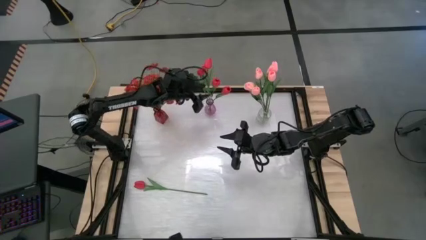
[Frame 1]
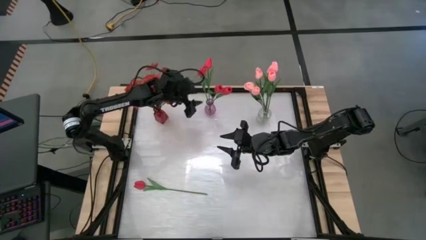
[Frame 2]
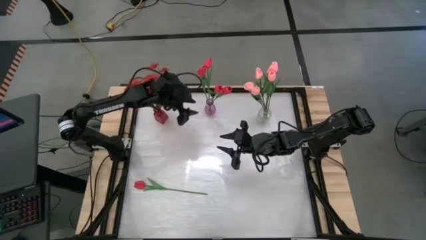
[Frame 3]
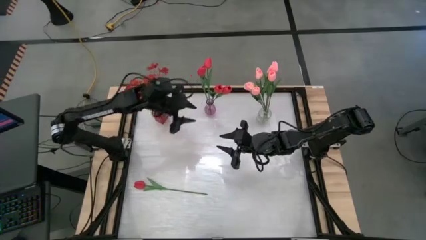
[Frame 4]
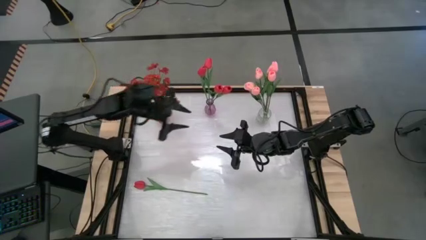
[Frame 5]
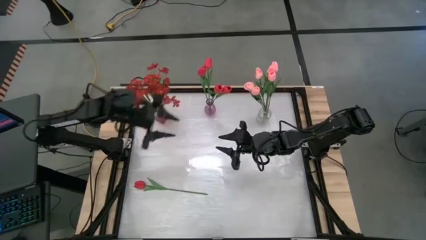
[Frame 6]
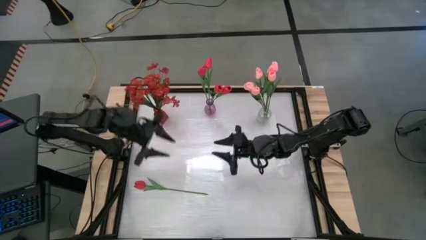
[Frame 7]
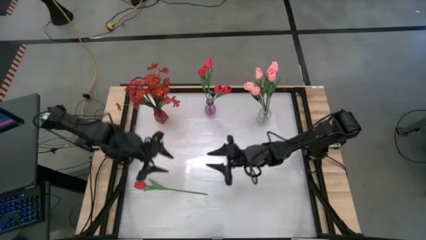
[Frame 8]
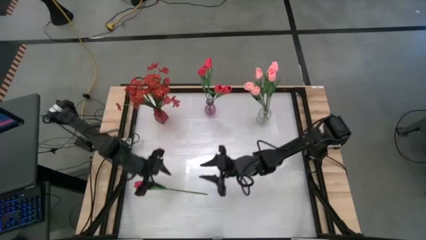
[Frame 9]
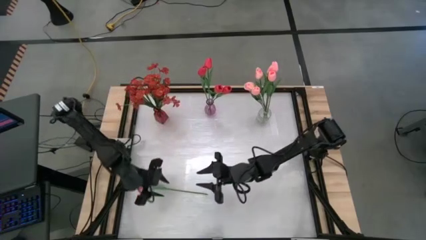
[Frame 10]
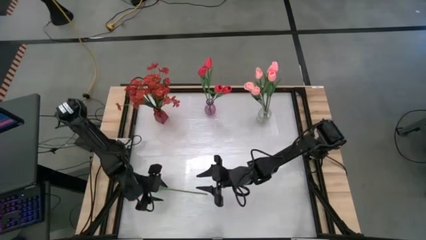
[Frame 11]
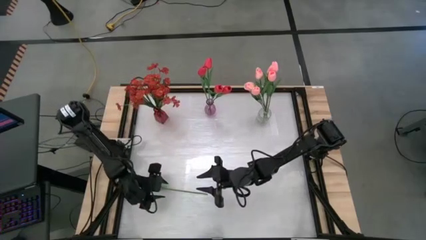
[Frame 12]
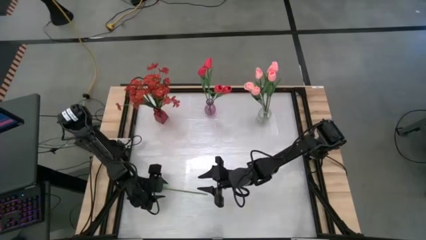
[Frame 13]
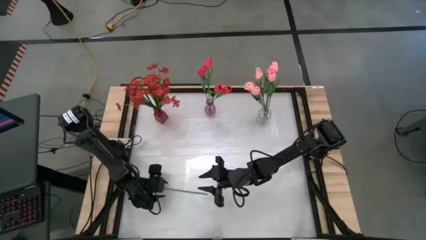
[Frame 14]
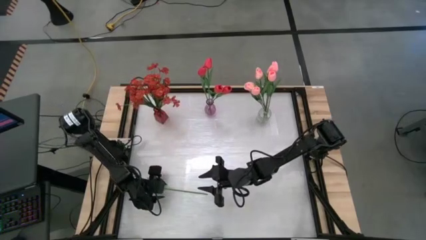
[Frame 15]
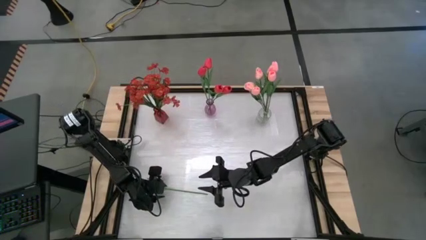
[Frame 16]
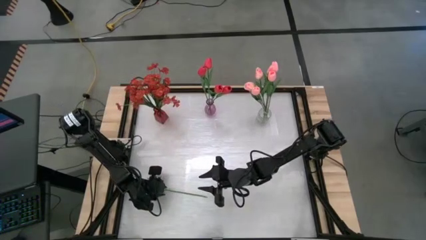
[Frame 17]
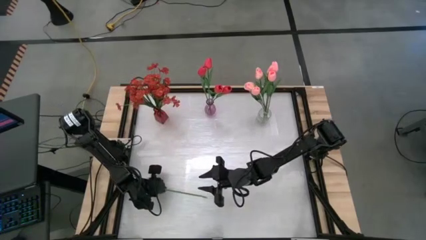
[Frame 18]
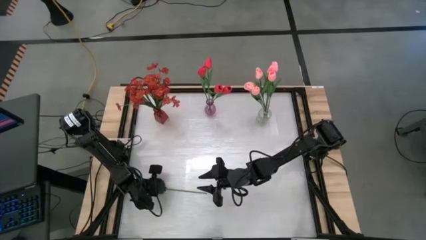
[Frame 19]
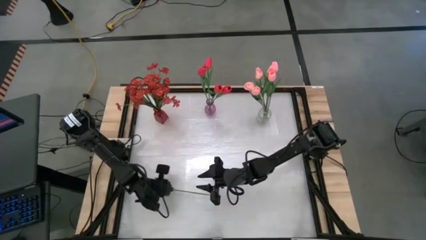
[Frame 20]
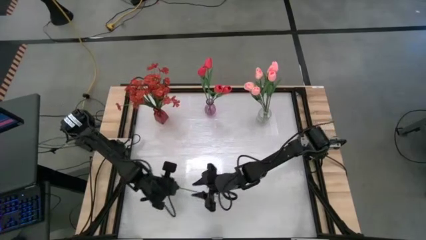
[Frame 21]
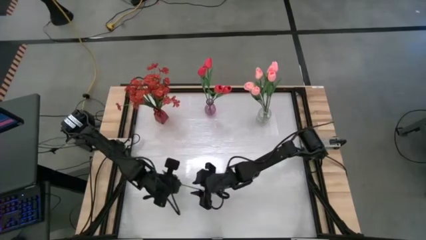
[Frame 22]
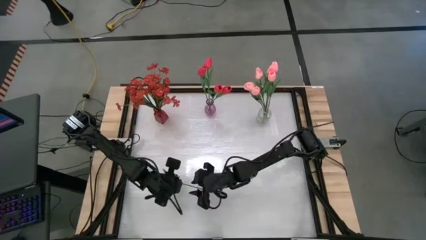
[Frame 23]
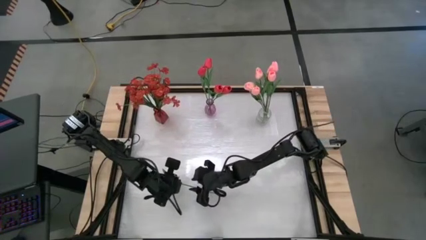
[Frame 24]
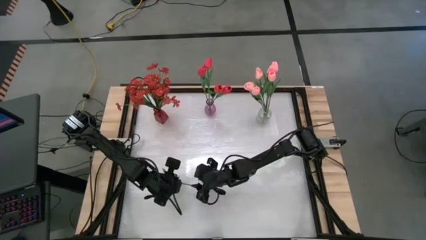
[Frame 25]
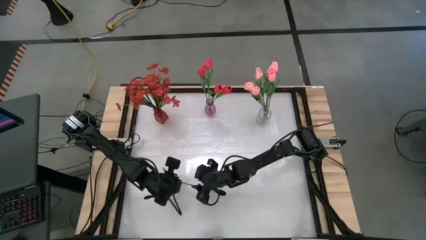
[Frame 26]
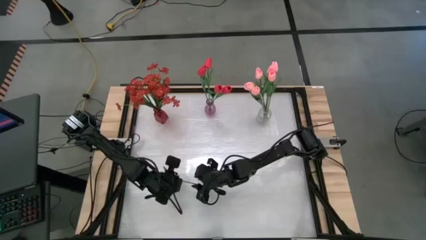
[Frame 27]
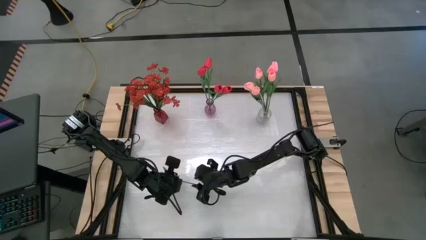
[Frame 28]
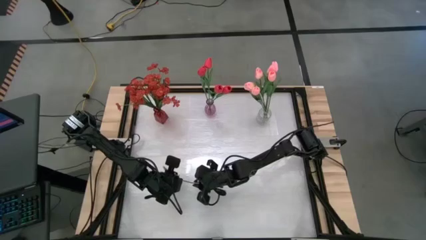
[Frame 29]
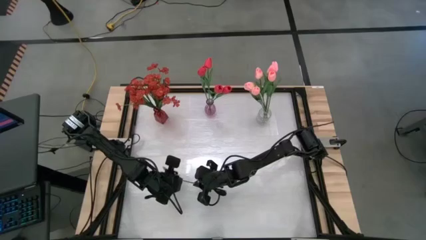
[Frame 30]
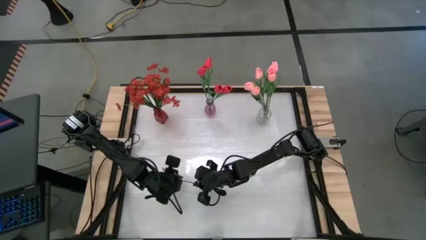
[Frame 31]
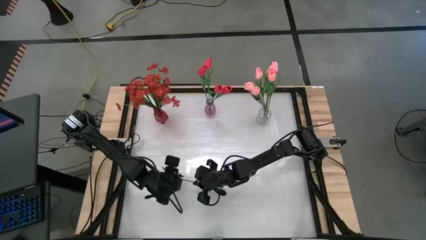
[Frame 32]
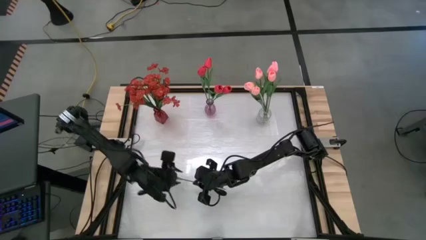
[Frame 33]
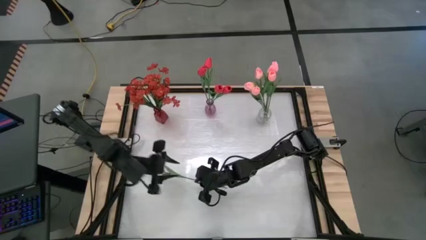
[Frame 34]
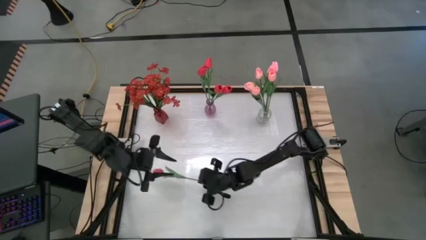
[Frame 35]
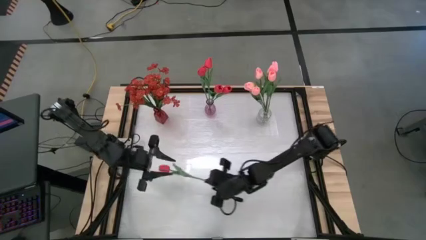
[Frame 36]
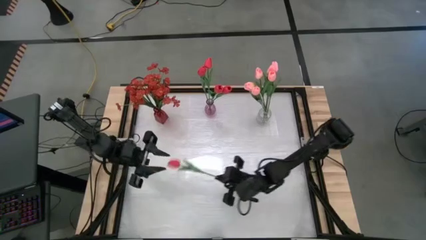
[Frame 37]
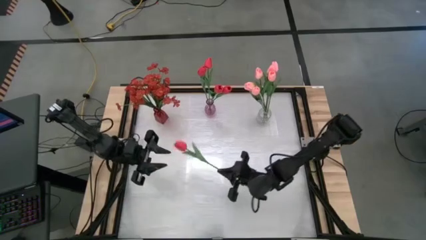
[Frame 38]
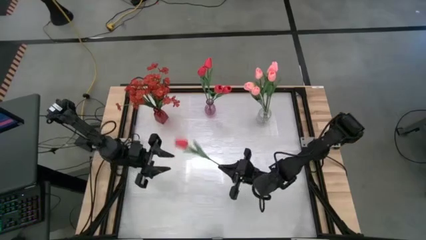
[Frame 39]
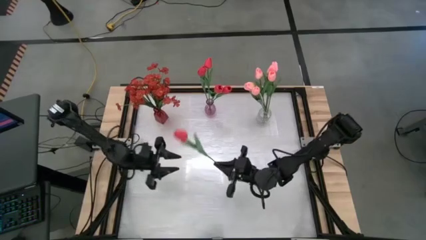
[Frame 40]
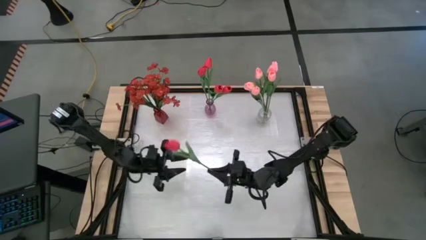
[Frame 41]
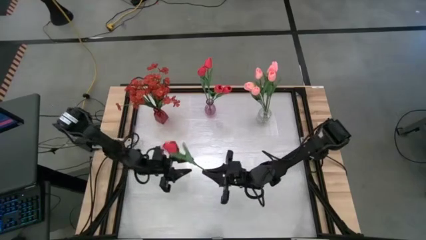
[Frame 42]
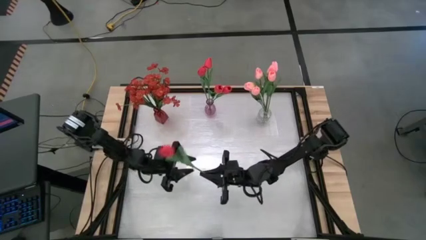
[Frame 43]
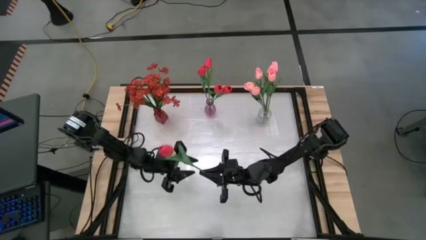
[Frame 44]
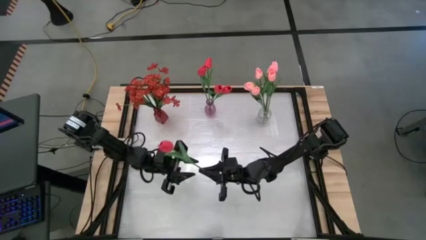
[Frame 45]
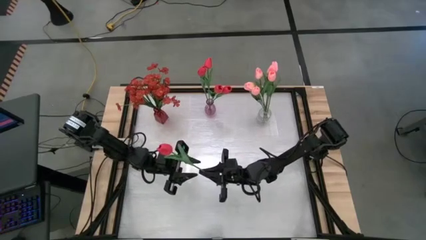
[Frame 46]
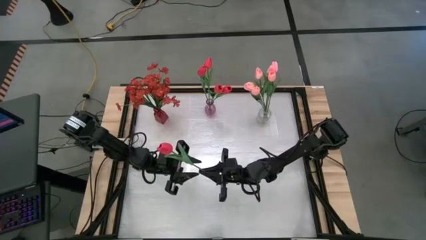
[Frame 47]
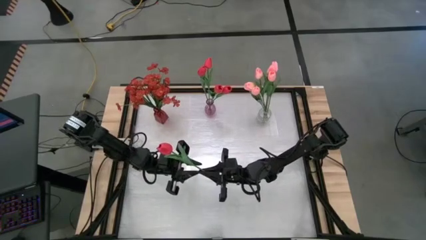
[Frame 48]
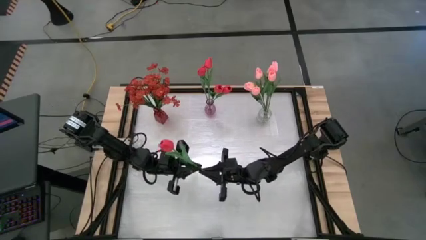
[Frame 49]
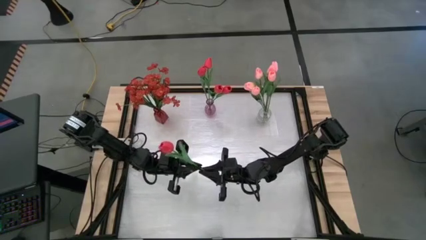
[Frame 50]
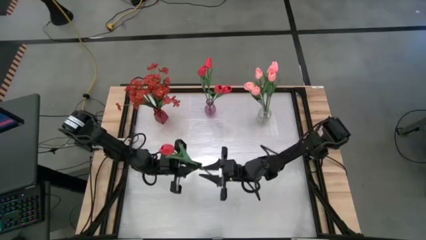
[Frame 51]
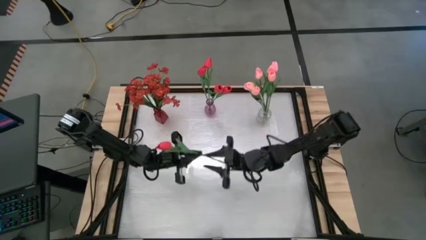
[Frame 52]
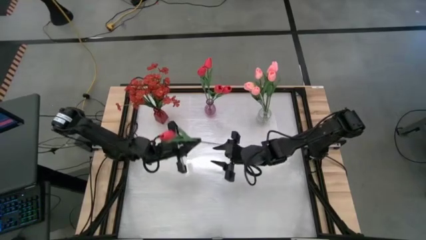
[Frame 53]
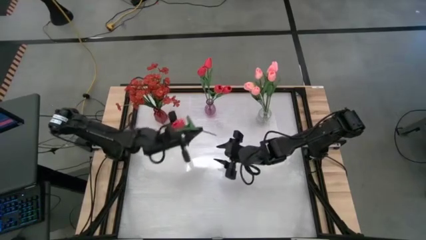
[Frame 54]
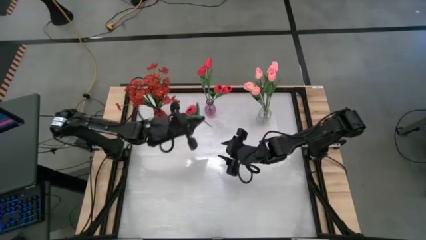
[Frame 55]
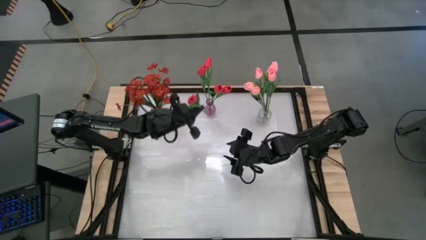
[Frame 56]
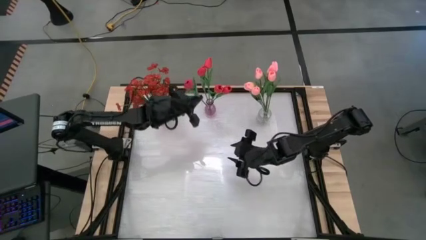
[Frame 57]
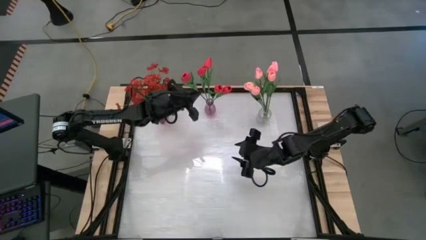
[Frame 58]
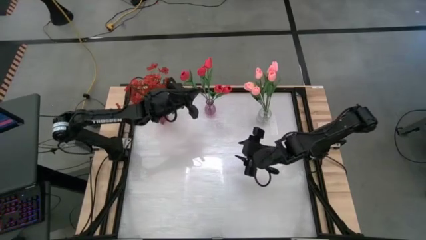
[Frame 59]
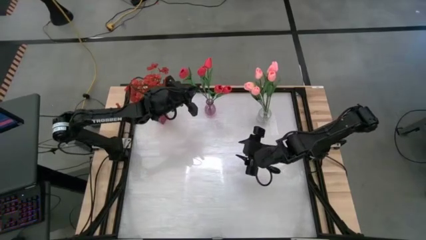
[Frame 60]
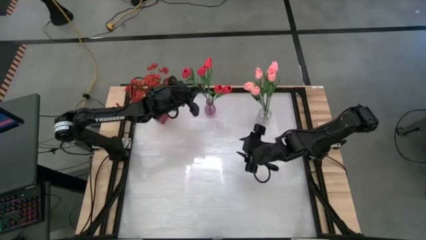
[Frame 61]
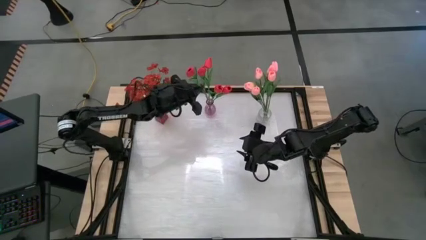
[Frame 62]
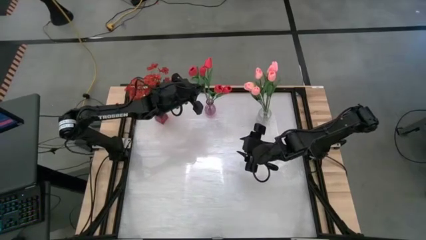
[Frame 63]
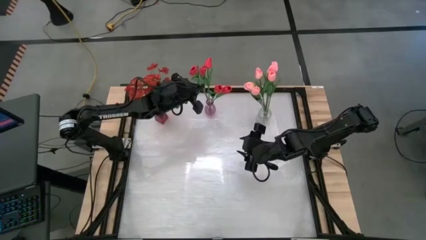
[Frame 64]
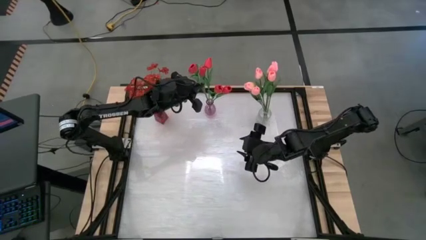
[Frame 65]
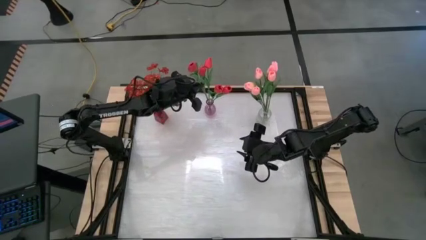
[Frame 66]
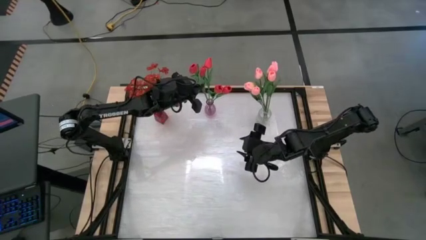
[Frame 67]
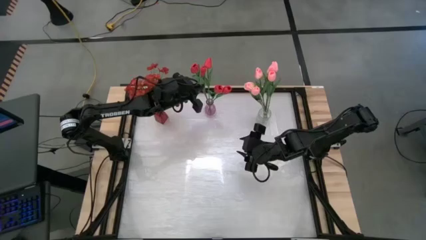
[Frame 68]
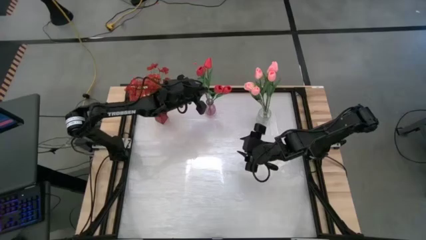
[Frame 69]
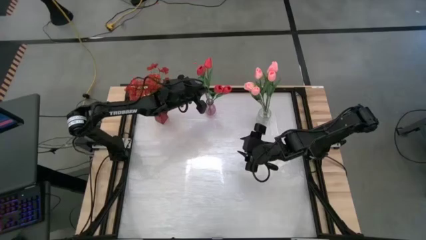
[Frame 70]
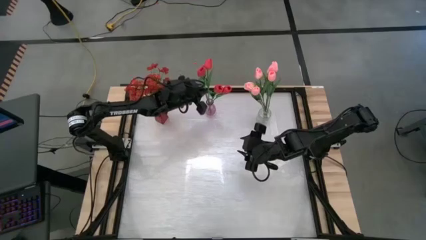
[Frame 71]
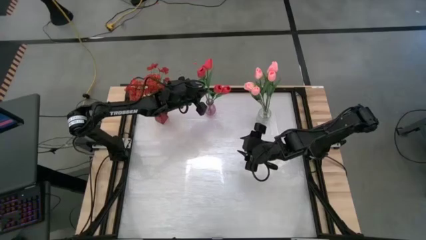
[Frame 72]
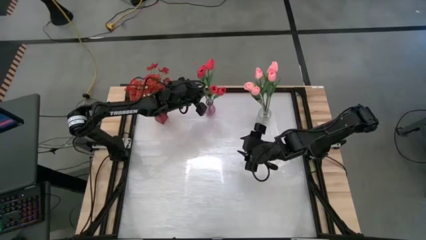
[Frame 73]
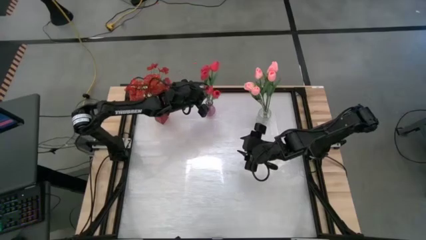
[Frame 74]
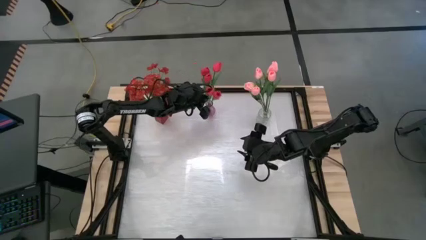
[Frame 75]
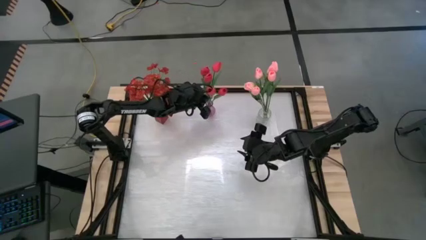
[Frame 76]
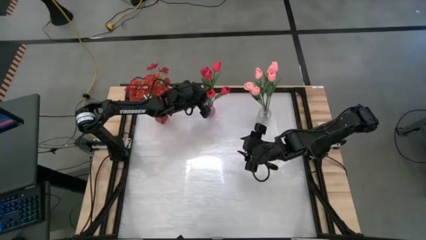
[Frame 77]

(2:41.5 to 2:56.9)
Task: Sort flowers into vase by color
Put the red tulip into the purple vase
